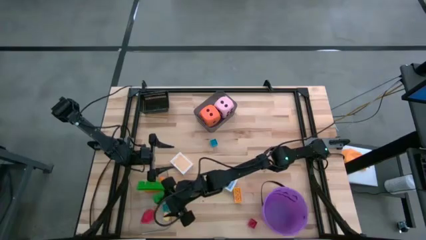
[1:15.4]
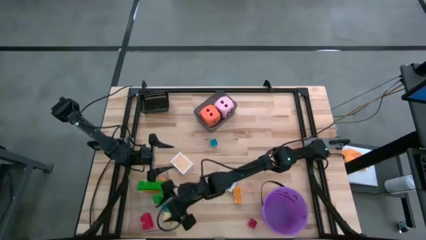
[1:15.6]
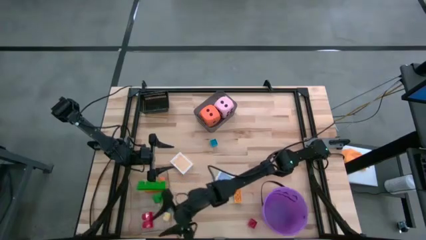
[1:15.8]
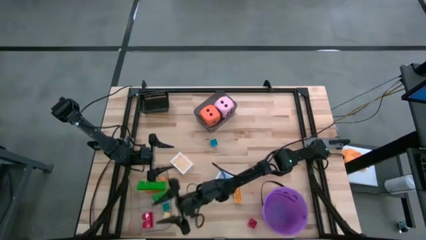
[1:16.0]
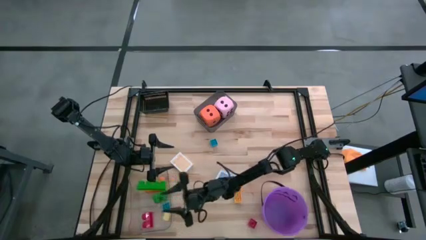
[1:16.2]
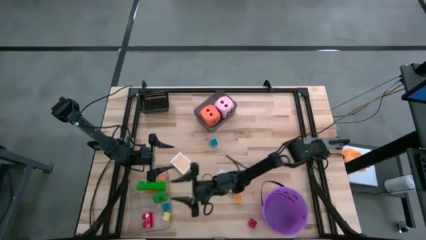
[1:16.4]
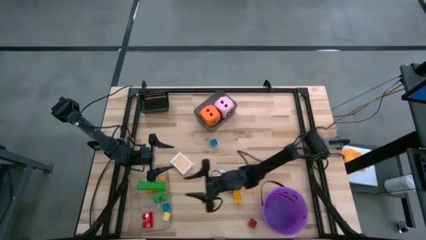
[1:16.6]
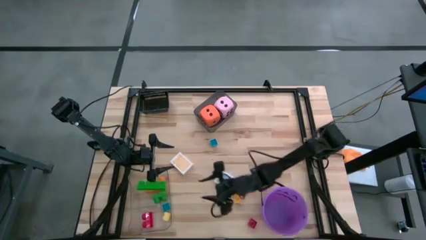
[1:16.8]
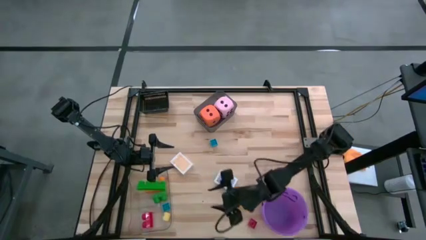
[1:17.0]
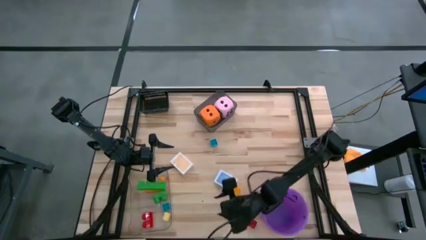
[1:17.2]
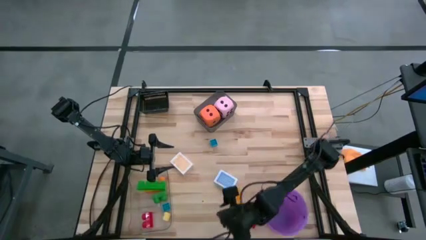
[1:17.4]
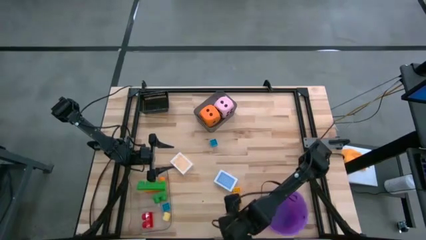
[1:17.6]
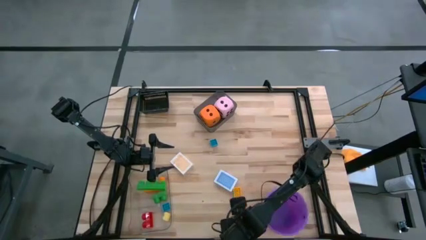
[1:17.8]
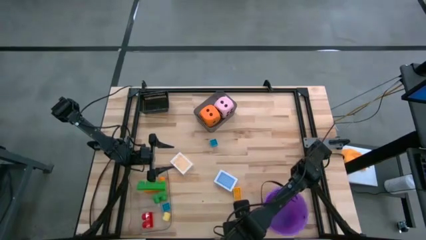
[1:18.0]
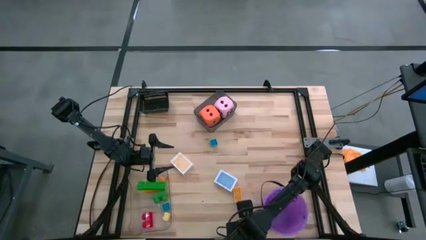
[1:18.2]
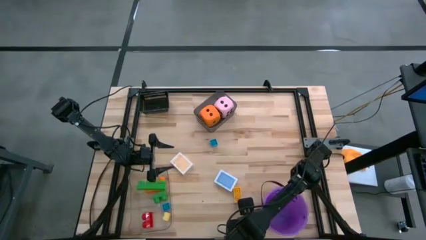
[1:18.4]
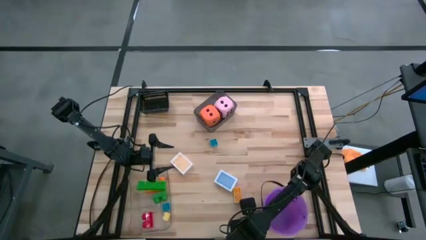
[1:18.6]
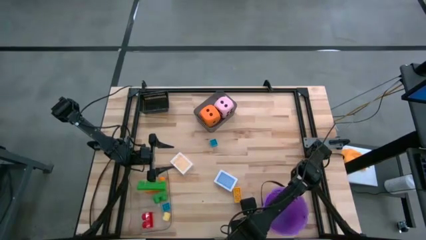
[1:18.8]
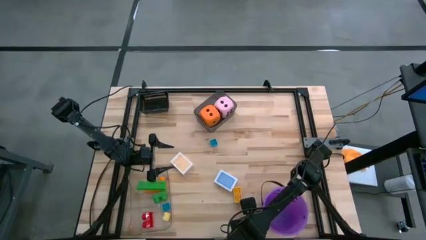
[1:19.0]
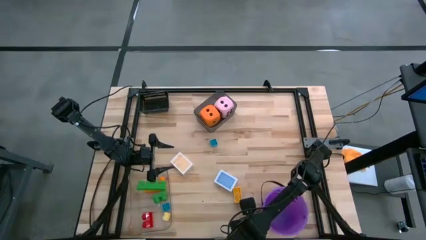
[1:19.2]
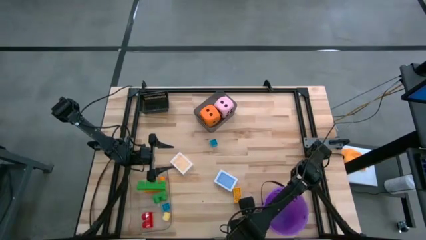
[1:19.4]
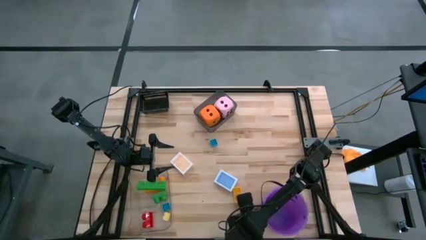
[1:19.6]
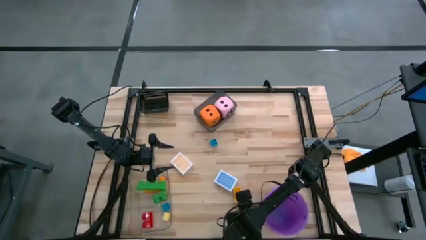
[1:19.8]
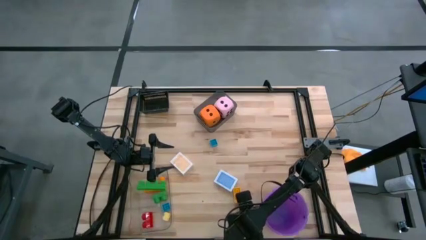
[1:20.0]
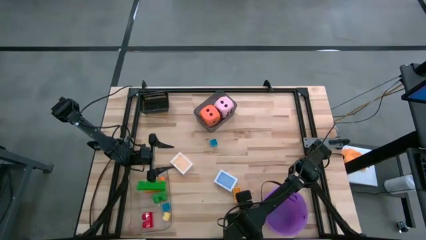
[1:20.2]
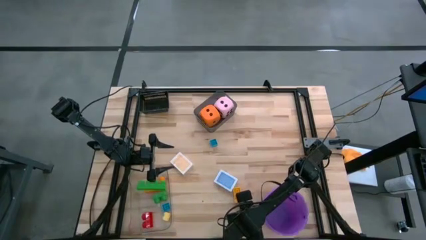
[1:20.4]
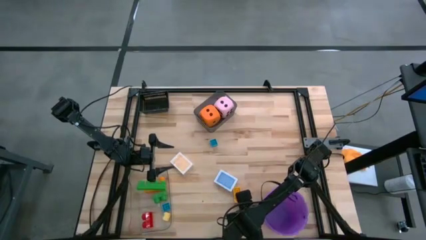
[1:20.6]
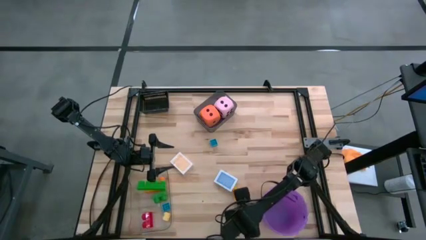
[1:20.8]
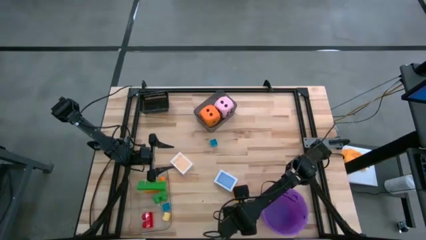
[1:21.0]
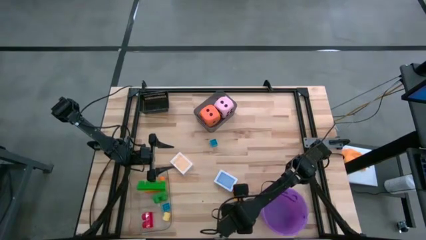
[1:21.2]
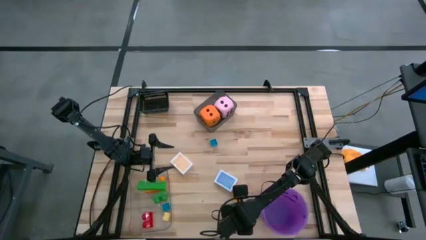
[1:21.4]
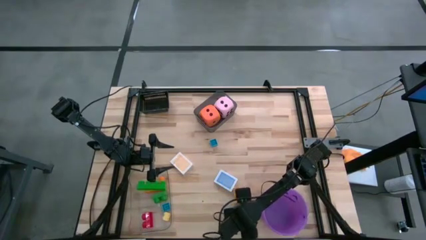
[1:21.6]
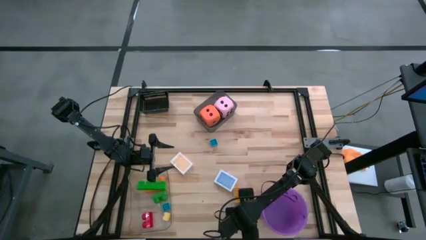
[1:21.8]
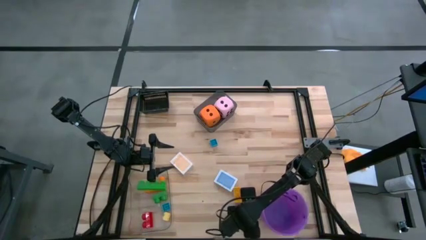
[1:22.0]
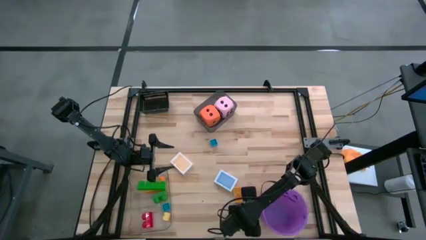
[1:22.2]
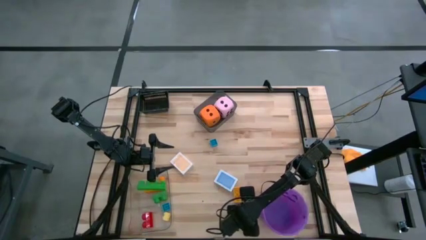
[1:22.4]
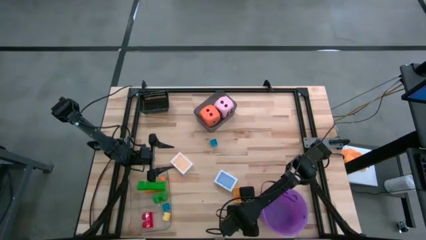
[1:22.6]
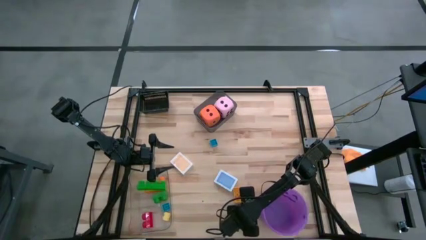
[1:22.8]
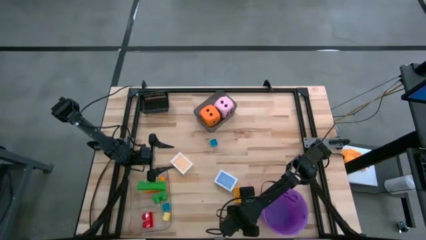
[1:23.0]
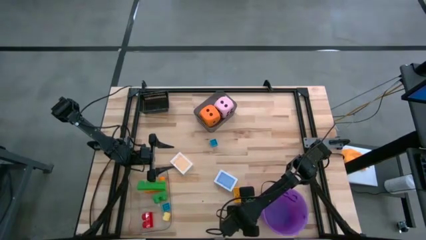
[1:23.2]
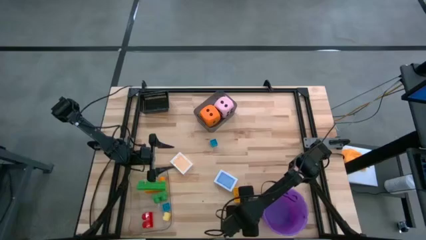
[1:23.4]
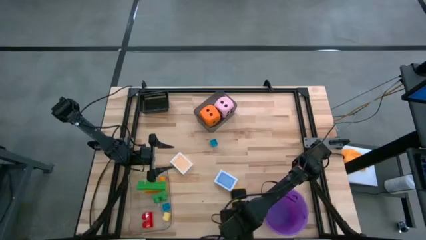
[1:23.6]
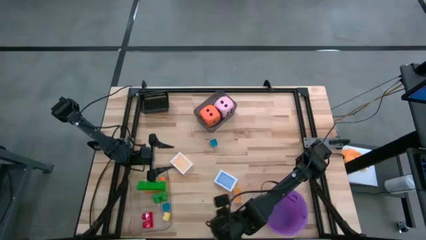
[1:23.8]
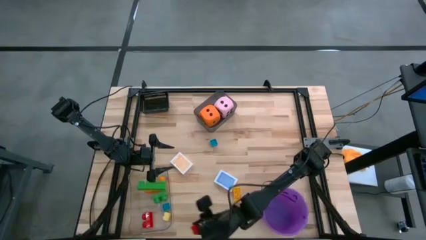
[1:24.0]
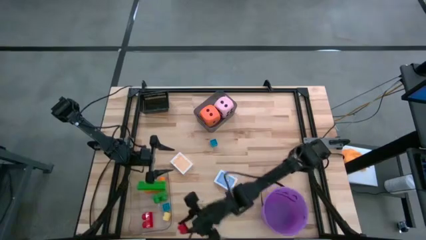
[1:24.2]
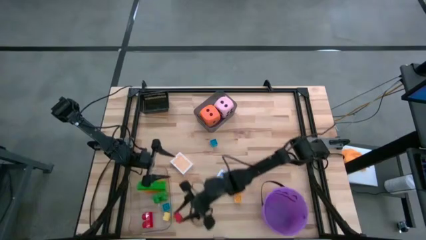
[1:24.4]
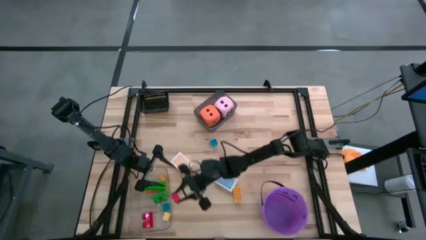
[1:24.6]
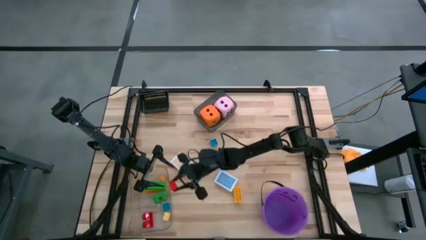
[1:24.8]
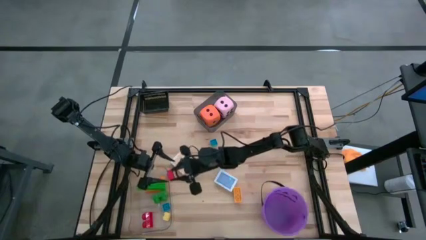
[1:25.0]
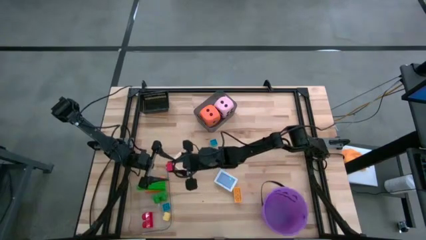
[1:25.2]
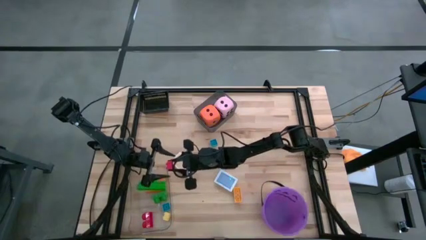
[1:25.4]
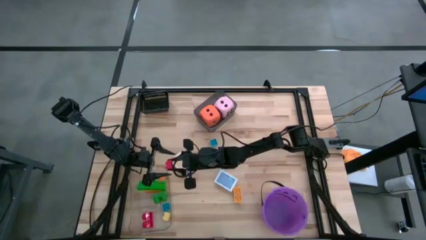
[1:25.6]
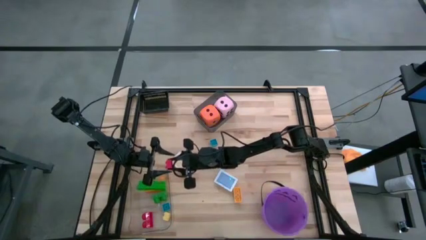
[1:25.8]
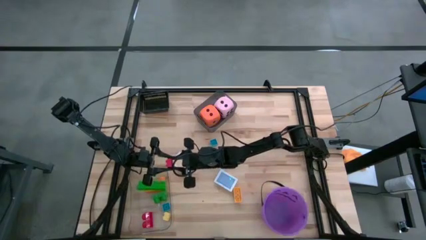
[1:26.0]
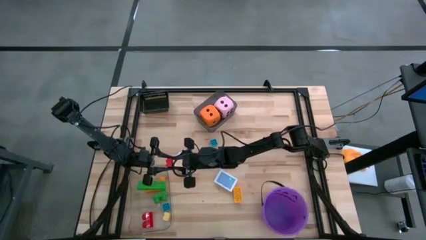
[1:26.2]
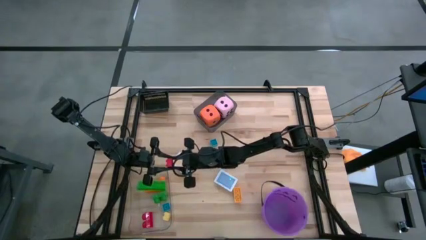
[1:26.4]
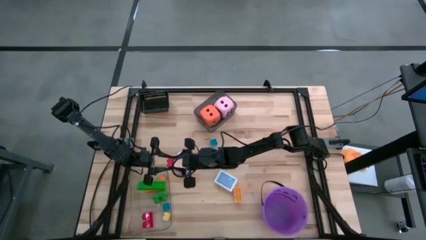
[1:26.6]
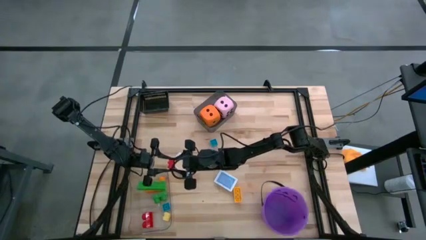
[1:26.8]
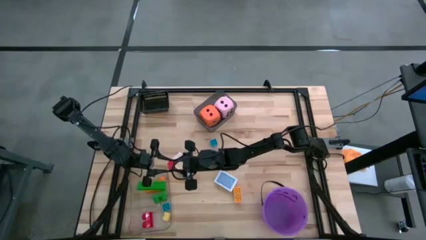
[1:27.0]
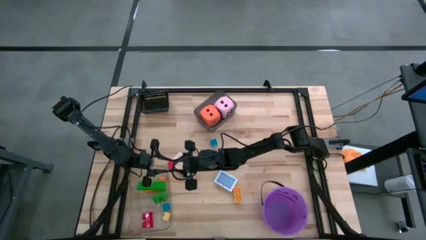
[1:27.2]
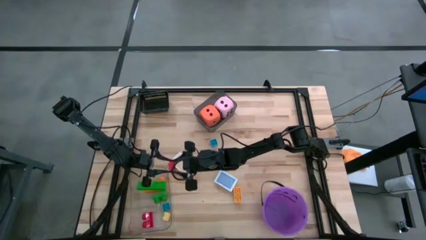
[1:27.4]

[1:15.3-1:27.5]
Task: Pick & Place Toys
Put the red game piece into the transparent bin

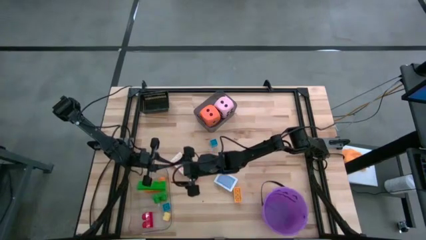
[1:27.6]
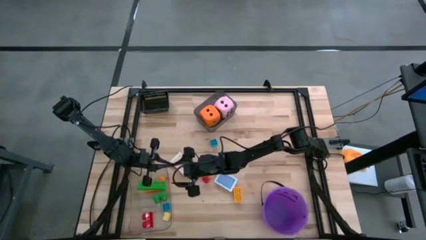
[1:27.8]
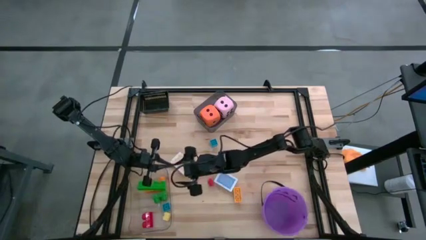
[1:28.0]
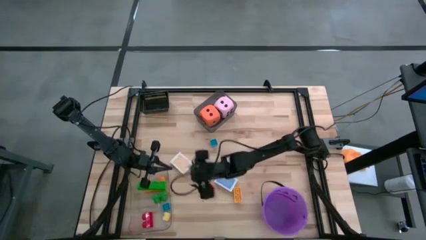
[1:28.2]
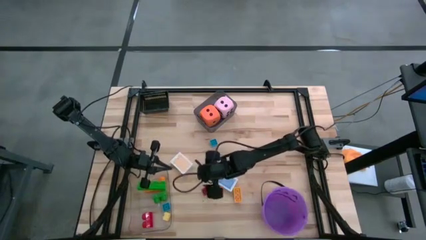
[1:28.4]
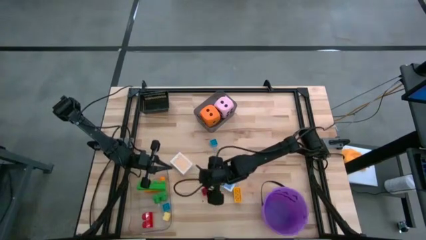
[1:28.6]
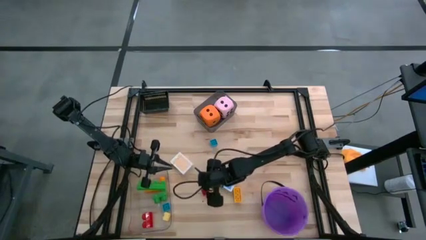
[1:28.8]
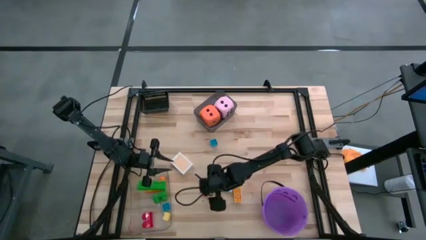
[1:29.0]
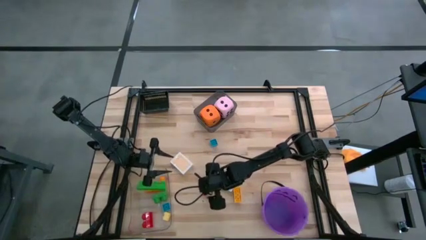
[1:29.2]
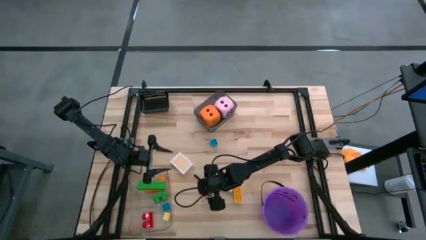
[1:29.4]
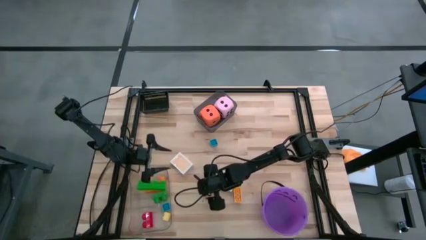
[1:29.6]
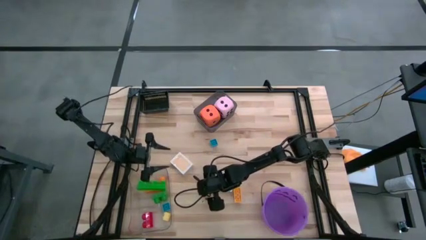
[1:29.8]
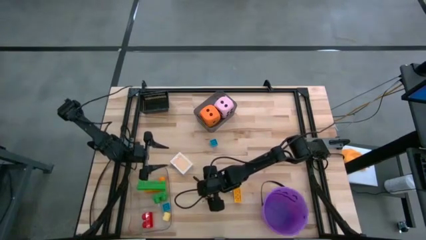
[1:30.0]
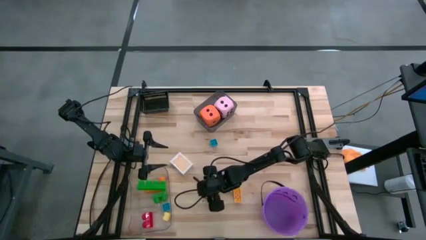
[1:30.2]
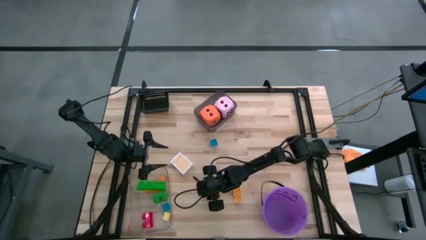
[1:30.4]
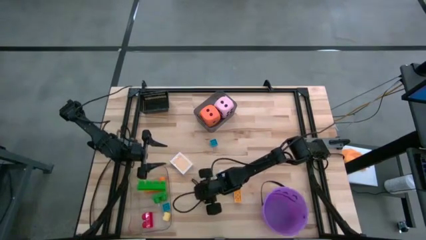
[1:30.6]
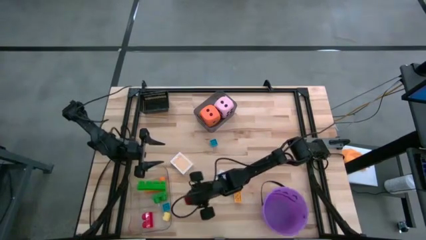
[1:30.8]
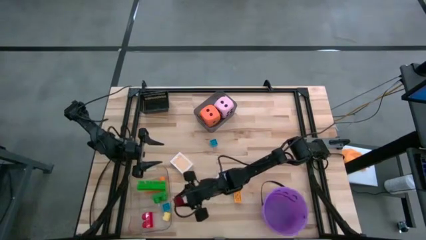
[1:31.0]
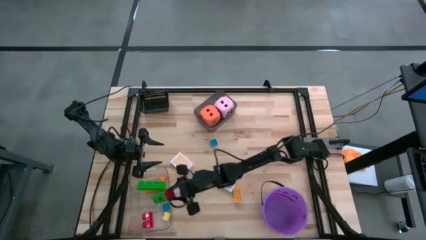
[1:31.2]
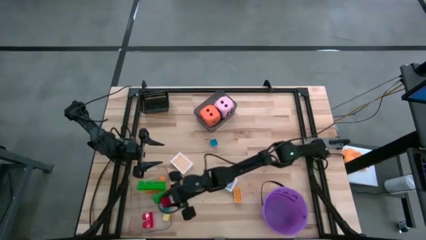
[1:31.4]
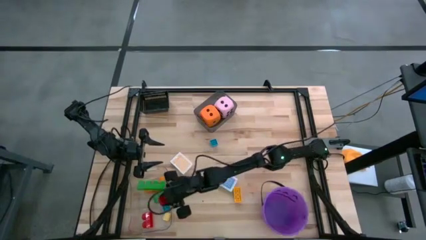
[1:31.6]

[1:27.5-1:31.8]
Put the red game piece into the transparent bin
